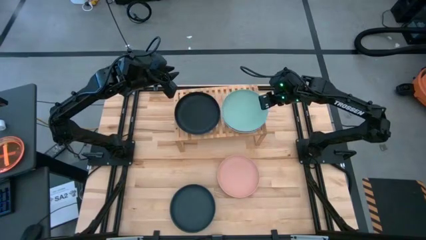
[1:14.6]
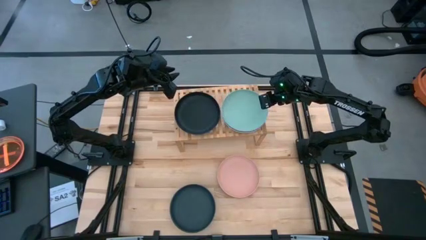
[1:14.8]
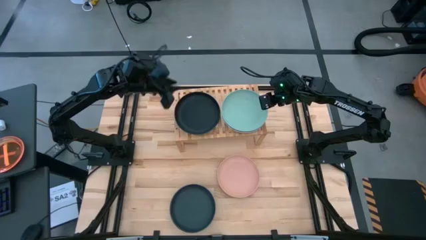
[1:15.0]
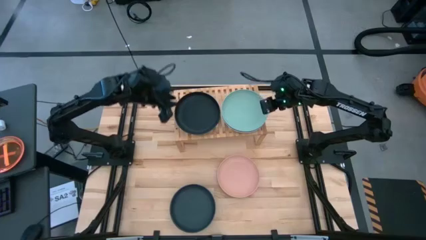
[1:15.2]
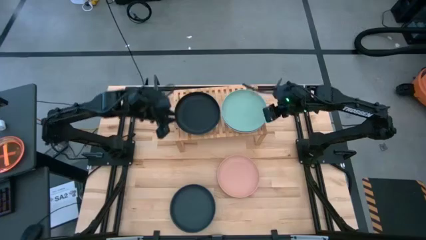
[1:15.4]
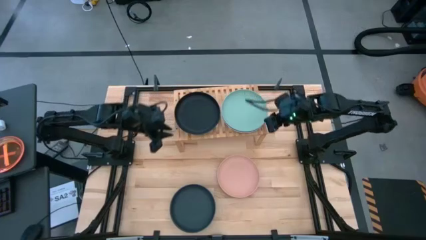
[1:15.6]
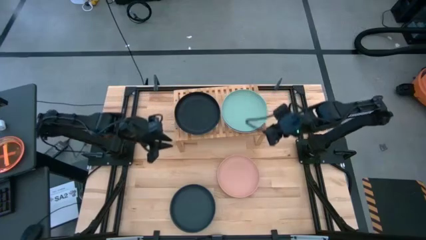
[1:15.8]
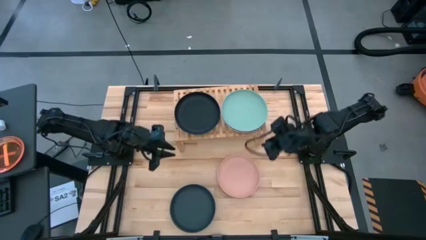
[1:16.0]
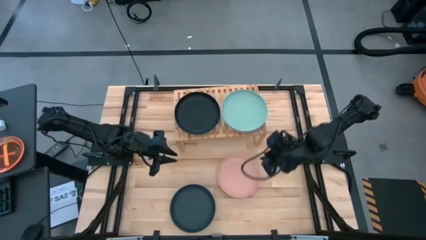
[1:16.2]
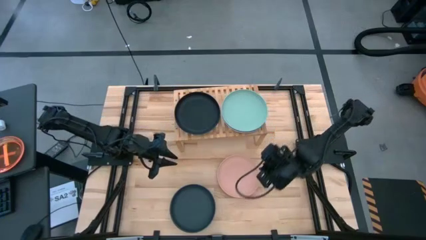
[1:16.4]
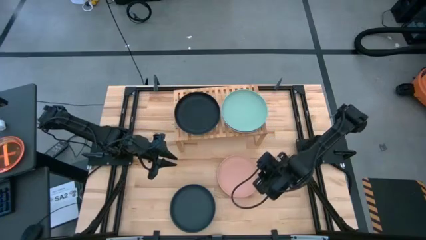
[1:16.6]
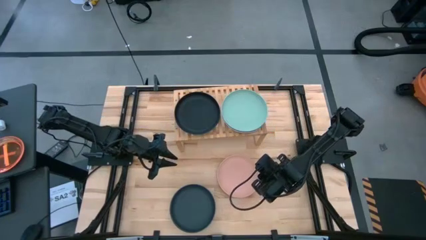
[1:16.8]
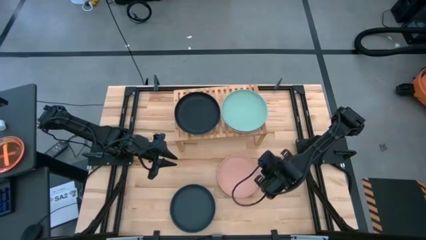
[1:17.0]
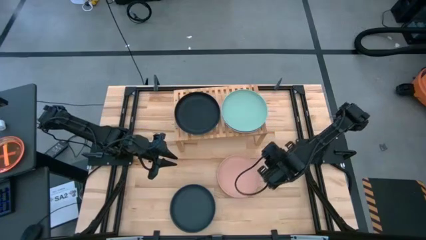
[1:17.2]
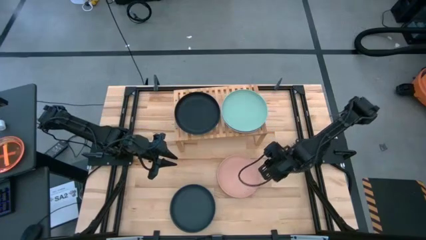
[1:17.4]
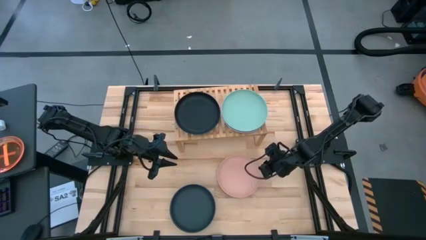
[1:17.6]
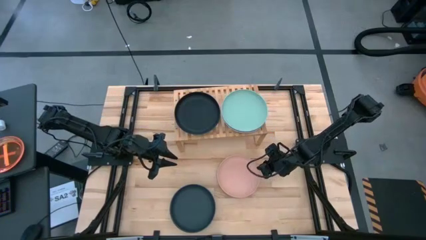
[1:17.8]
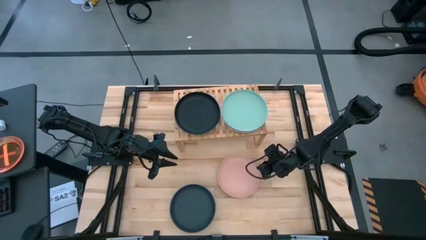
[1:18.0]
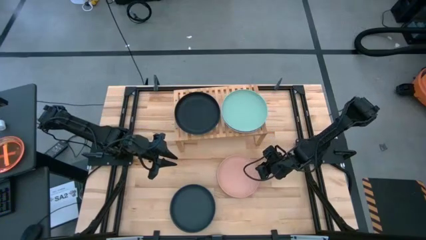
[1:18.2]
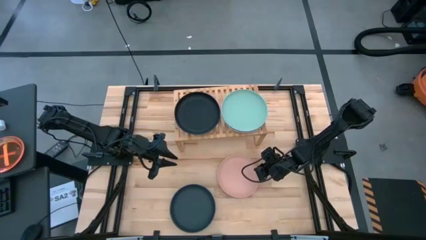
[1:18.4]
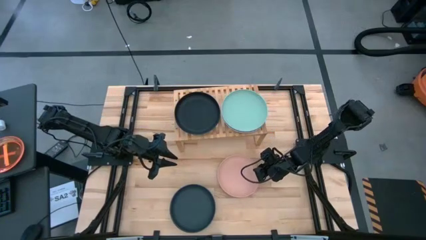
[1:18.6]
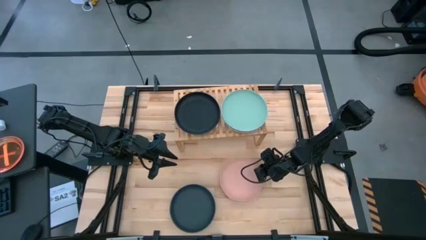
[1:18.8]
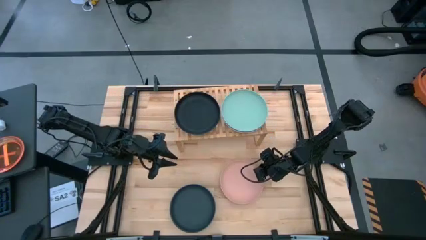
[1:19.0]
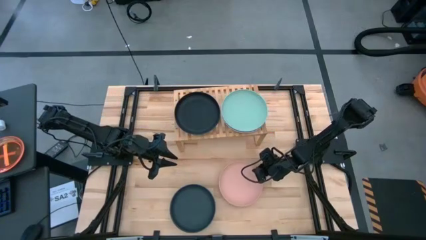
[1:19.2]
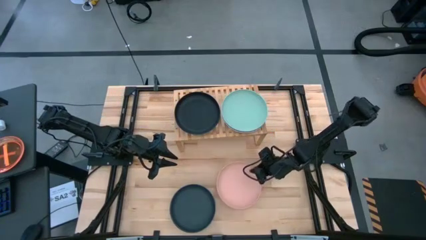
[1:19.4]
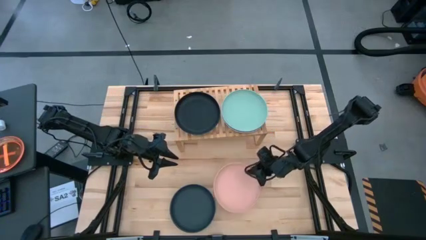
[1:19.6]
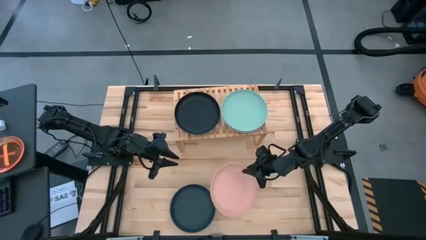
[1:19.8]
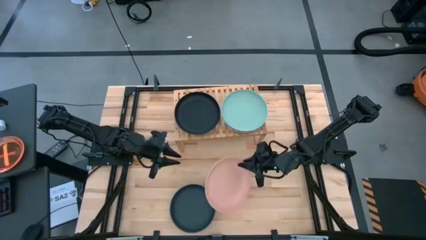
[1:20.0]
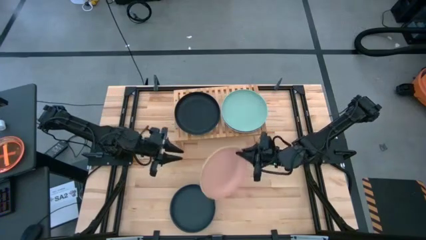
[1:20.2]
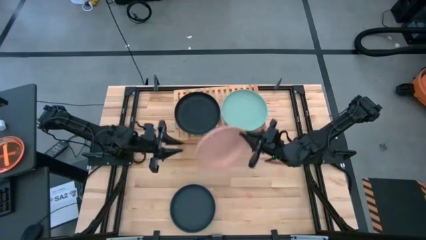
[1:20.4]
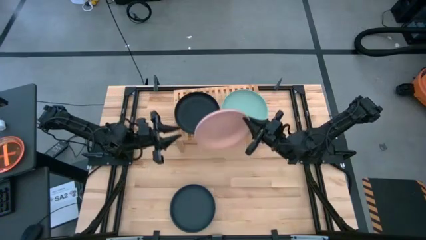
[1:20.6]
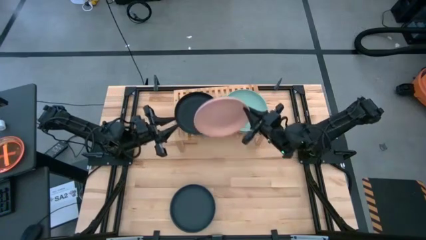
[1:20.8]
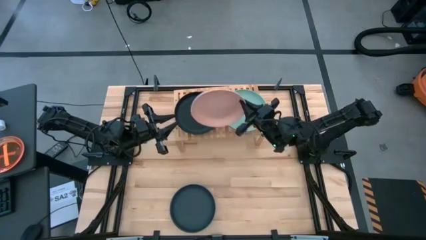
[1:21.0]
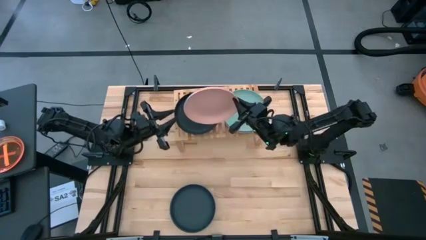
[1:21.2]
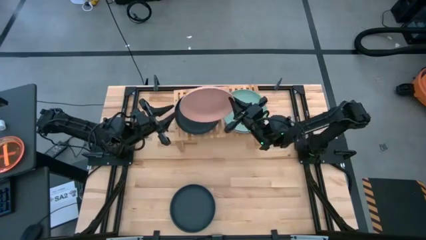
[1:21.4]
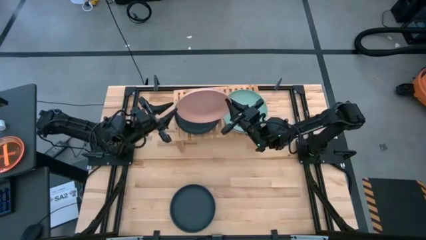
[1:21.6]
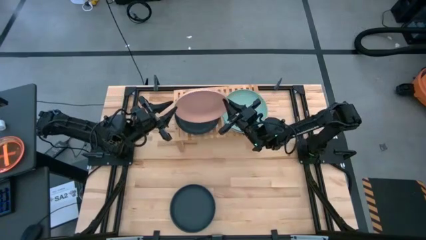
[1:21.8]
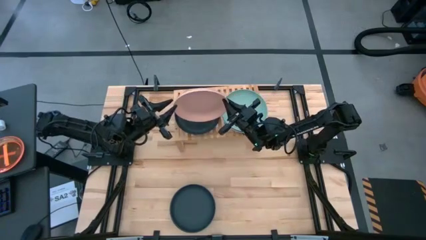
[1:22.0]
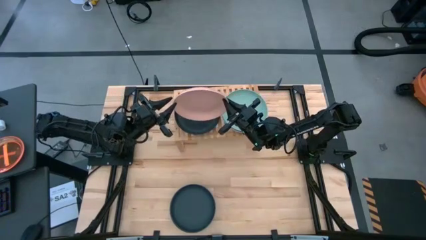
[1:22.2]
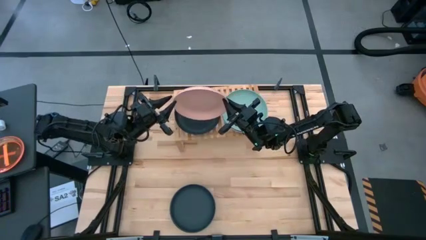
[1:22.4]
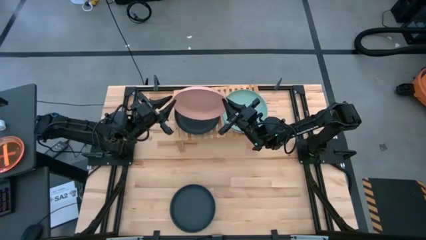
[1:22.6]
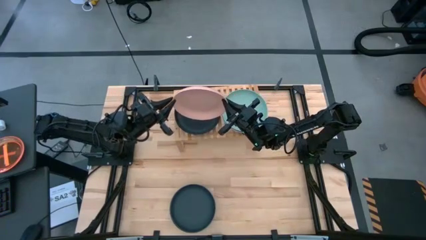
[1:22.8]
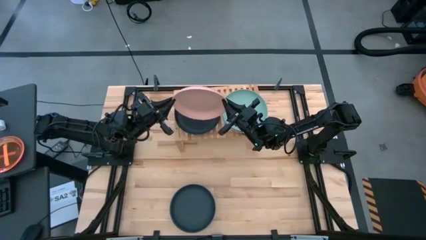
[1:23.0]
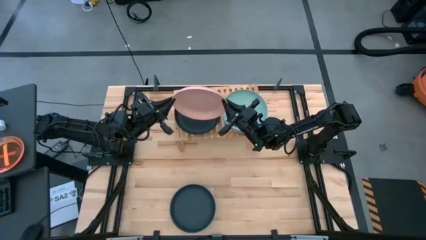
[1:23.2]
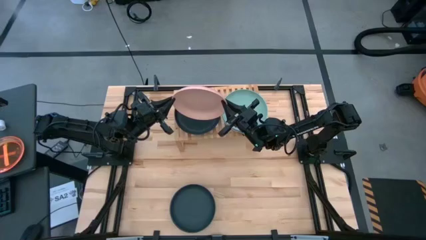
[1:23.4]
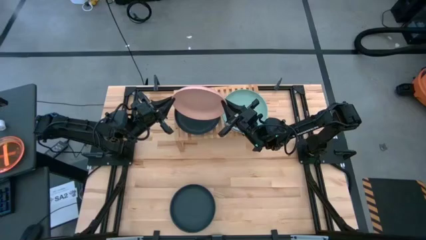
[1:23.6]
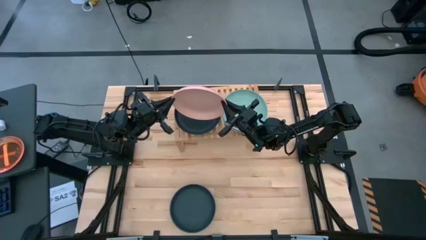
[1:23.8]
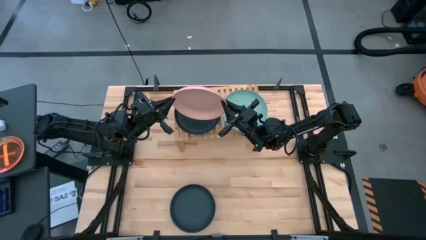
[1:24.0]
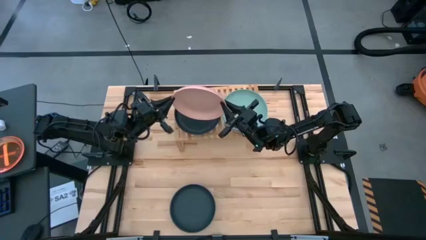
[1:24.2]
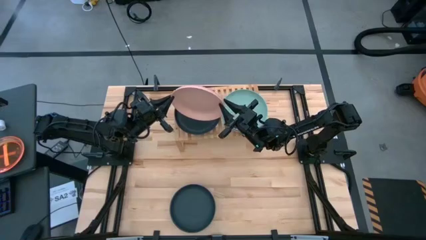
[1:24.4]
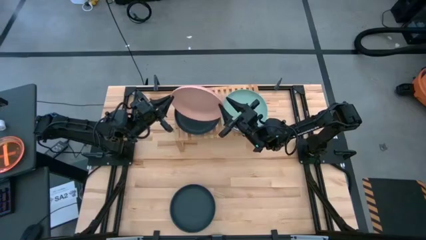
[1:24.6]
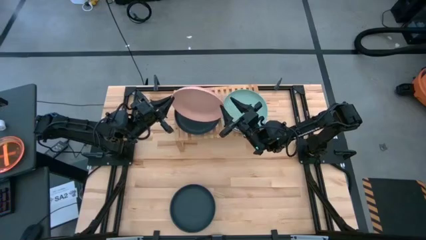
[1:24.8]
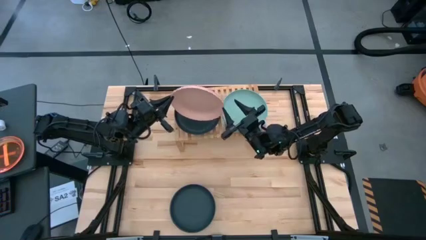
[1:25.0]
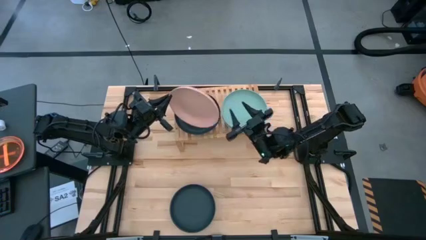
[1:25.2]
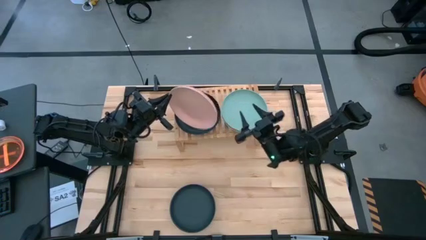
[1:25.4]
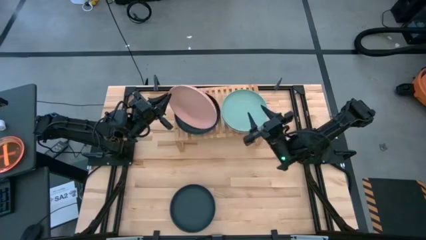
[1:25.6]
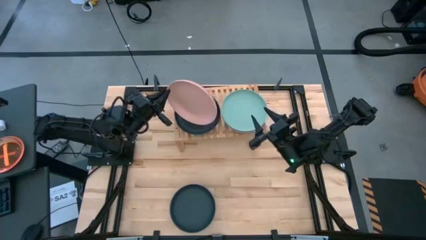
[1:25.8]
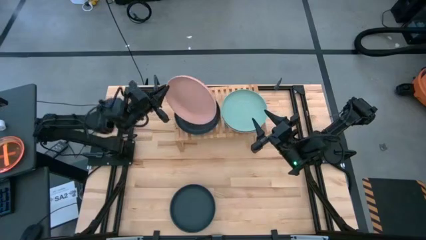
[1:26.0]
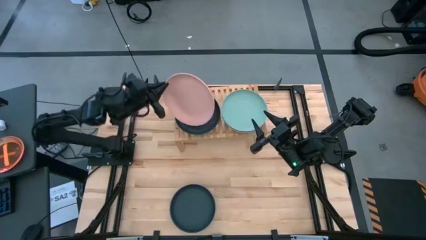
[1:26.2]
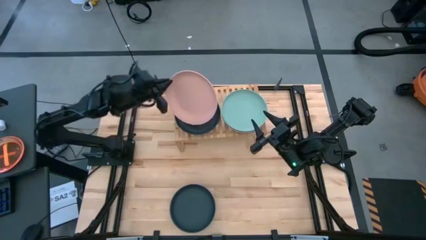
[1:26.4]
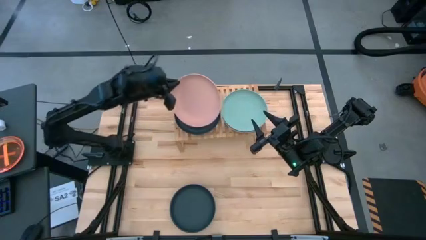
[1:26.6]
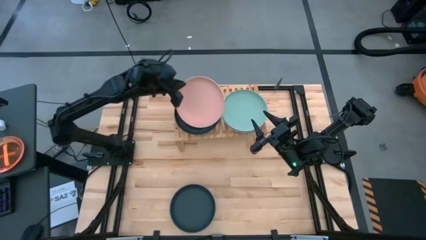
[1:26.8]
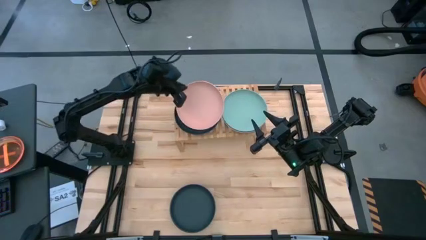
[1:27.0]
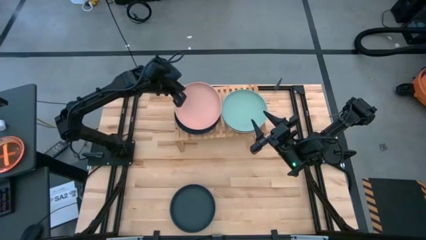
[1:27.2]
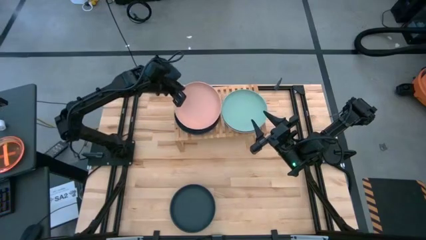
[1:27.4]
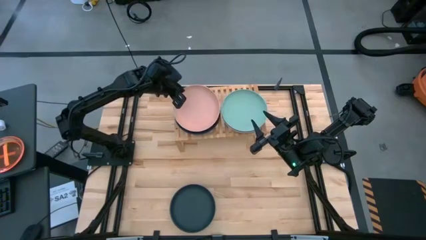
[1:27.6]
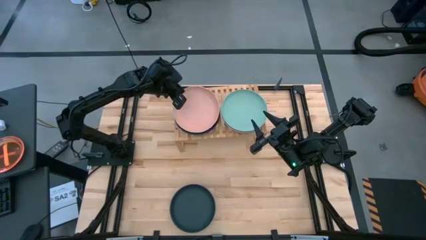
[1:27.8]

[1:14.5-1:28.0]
Task: Place and stack plates onto a shelf
Stack the pink plate on top of the black plate on shelf

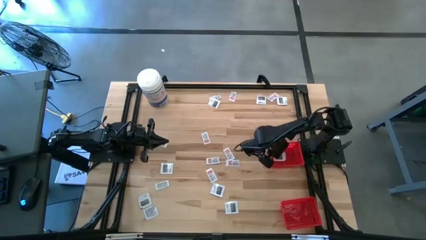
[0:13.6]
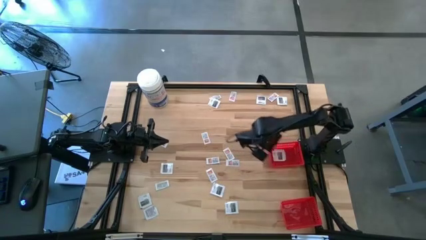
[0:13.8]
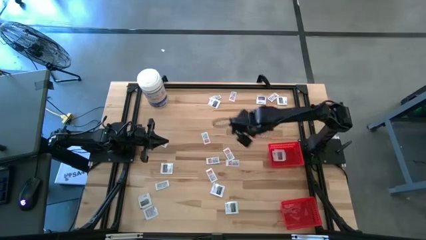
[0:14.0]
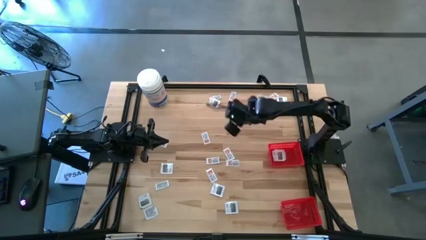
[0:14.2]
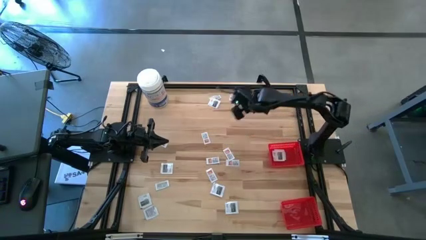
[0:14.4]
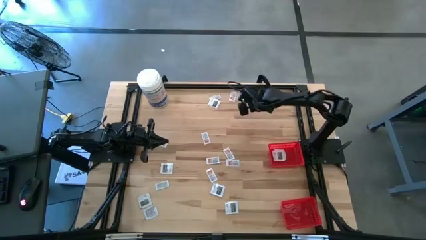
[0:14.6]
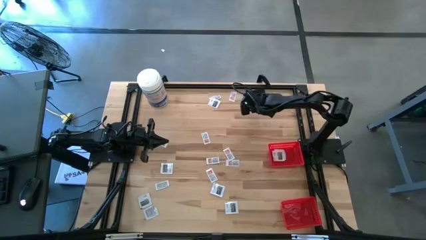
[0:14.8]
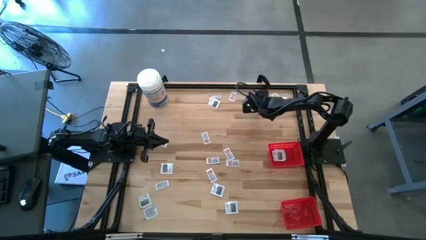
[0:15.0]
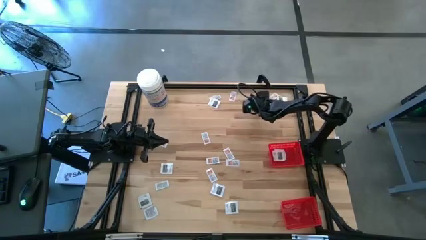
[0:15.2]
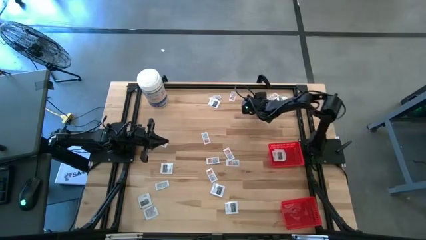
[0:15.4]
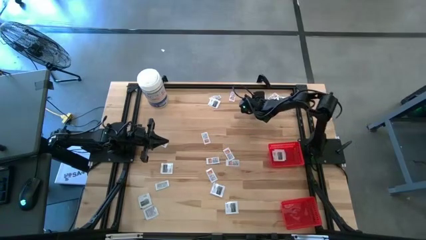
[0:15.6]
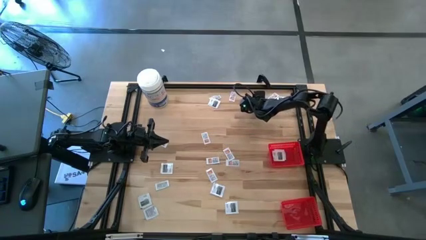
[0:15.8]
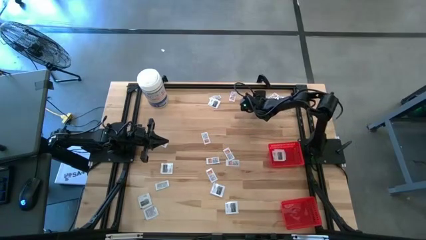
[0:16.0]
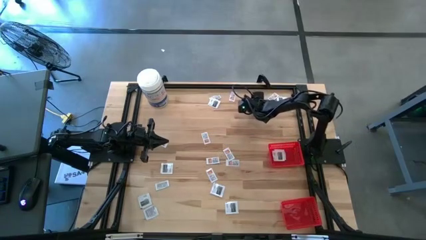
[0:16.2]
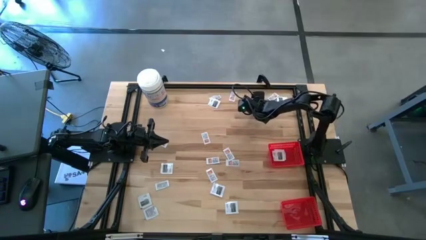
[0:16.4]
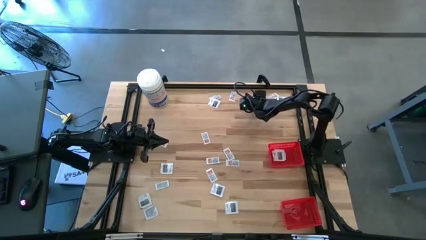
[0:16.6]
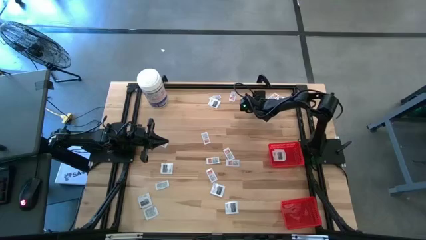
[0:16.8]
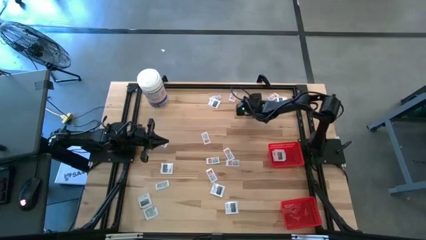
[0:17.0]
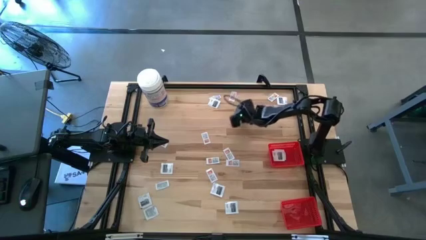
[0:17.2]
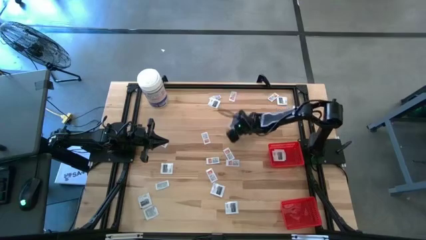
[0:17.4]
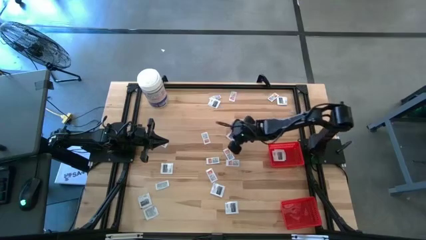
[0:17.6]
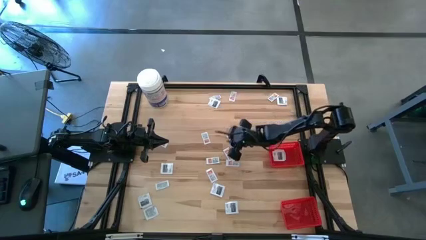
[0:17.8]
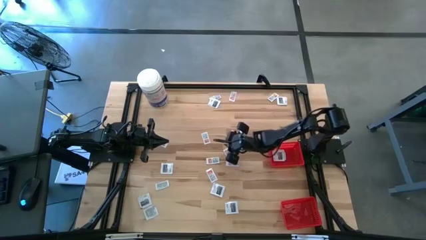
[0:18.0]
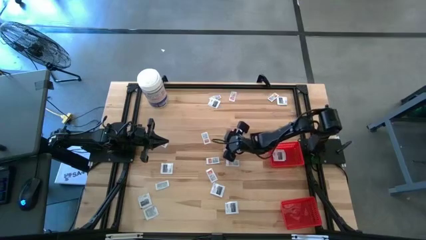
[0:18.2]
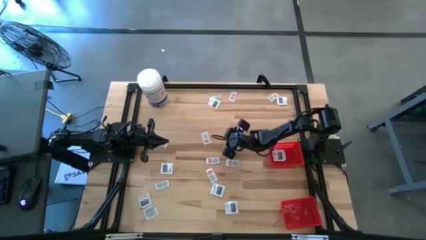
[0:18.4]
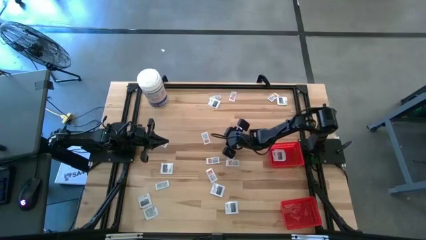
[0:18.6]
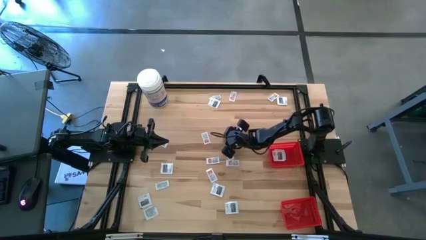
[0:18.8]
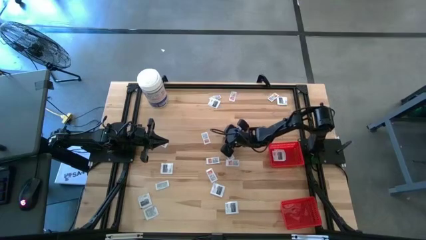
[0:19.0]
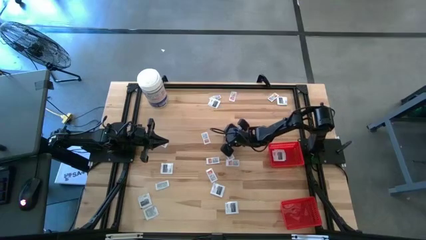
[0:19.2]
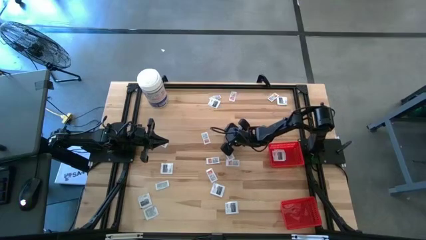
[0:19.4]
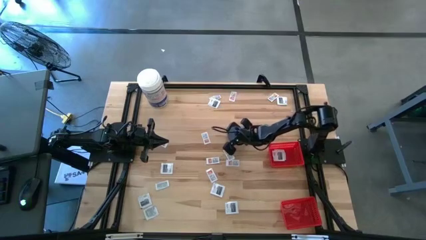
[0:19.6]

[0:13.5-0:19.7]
Task: Pick & Place First Aid Supplies
Put the black towelette pack into the top red basket
